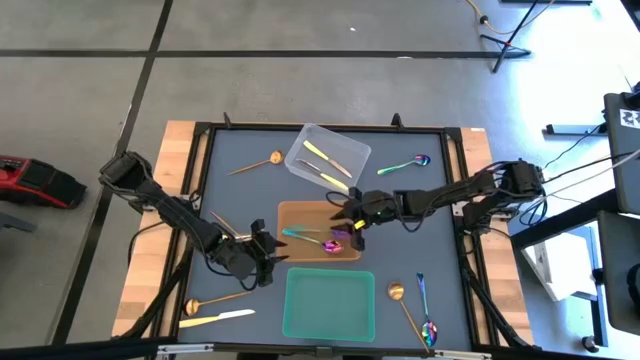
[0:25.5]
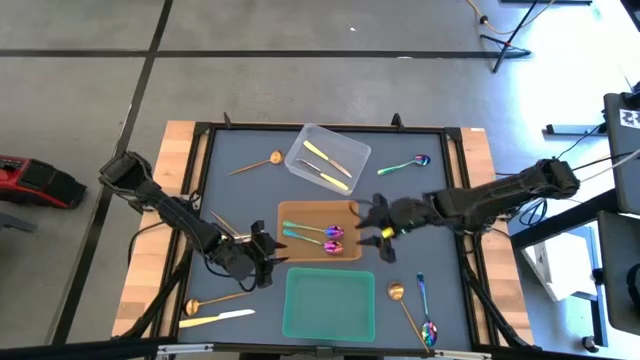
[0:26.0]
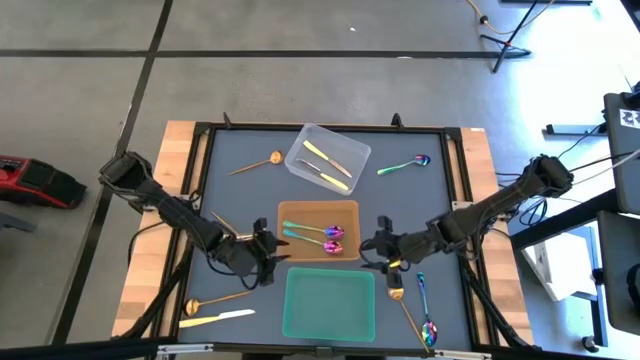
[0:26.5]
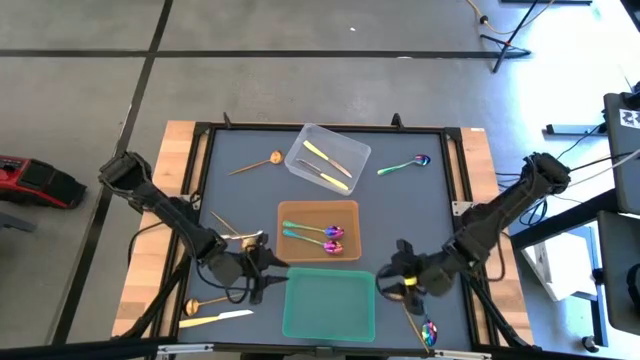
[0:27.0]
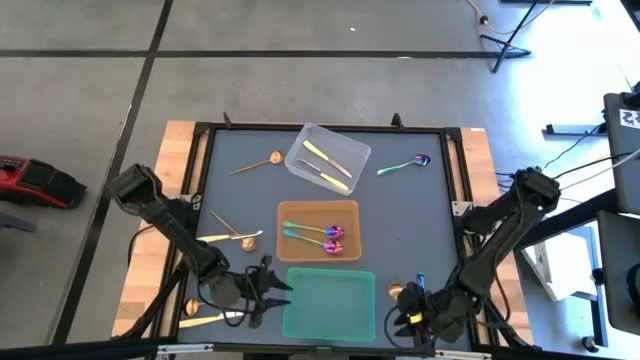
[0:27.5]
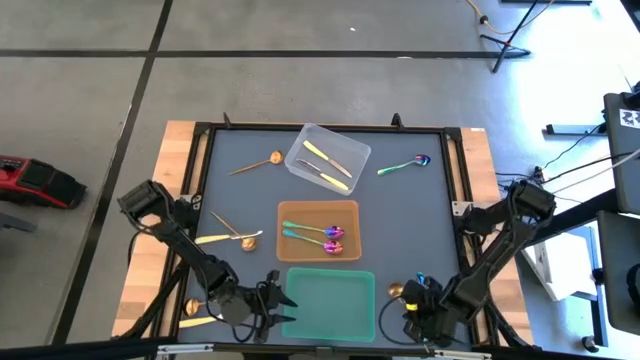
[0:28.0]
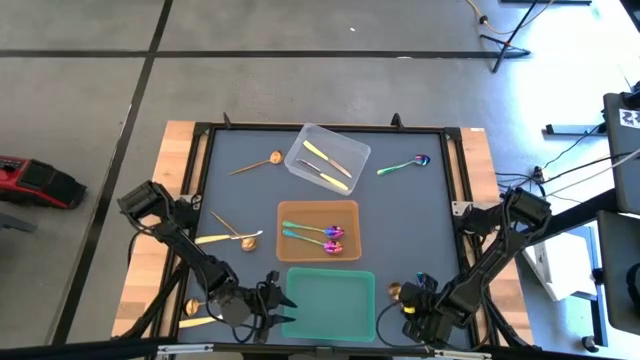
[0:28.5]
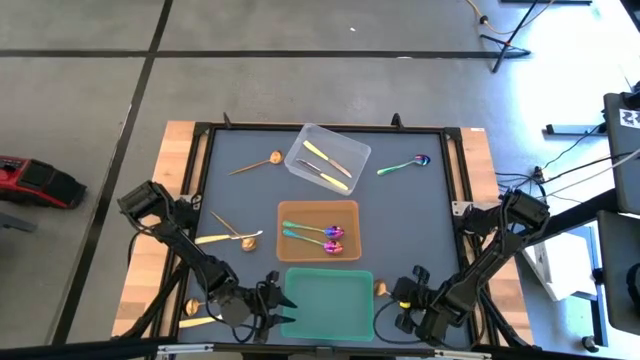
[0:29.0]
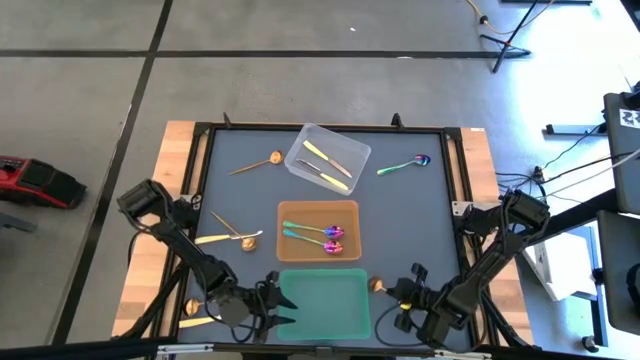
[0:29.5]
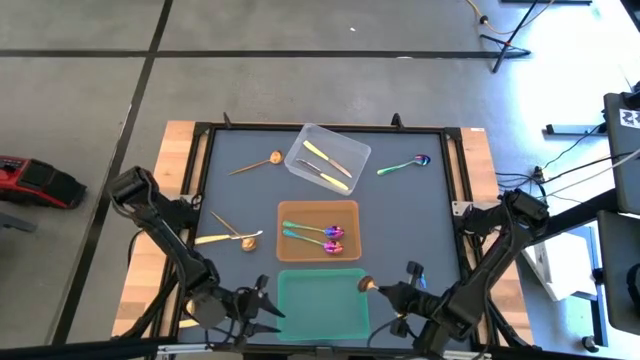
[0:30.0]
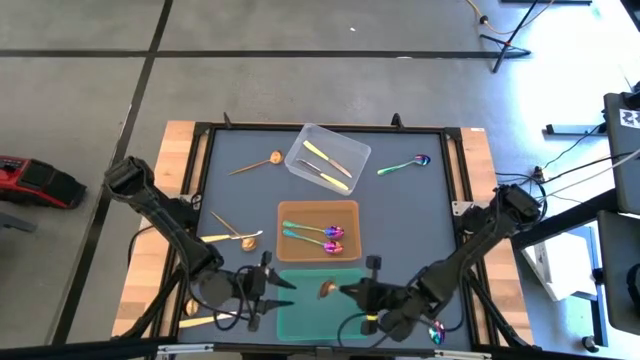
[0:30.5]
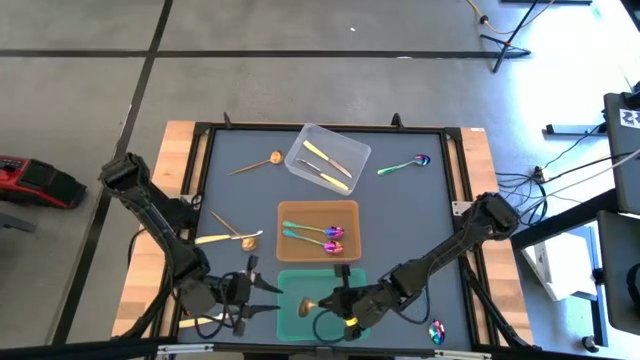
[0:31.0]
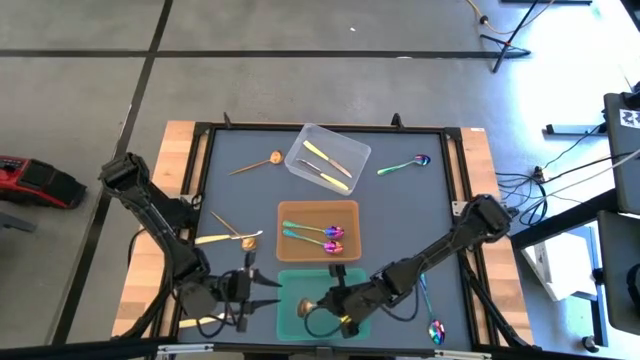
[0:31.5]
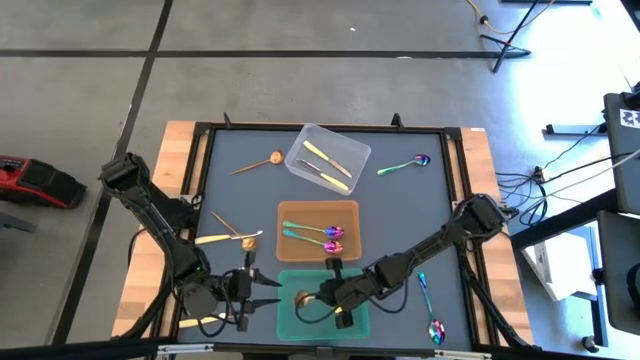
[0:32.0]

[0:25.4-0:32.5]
Task: Sort silverware by color (type)
Put the gold spoon into the green bin

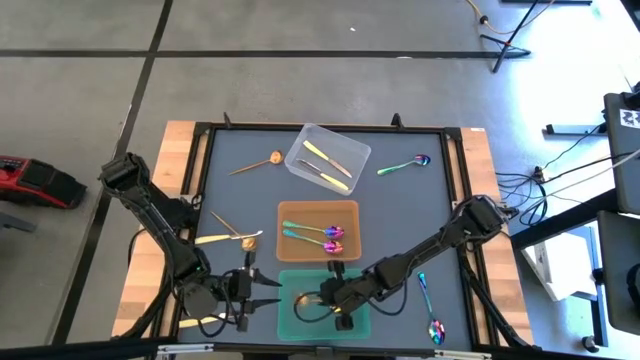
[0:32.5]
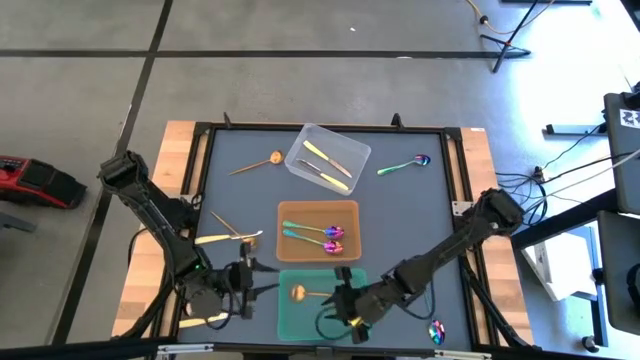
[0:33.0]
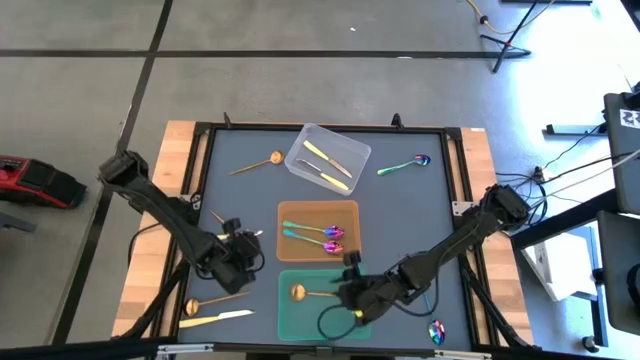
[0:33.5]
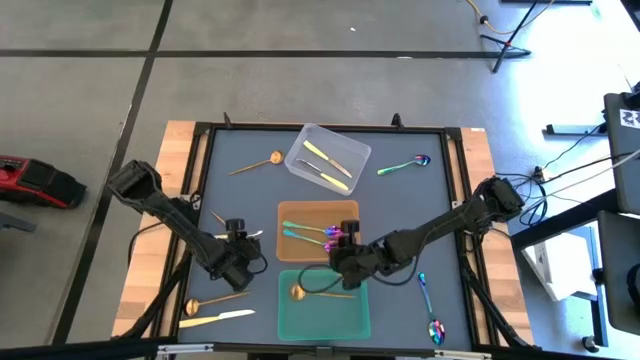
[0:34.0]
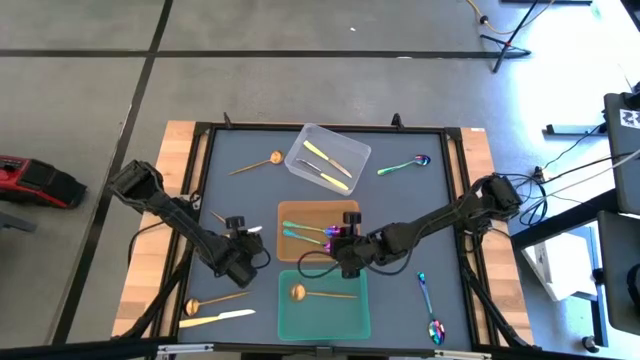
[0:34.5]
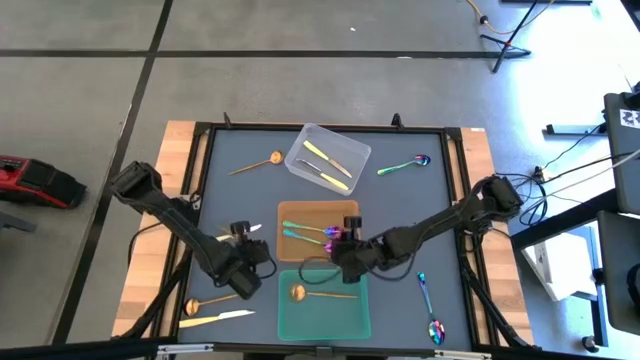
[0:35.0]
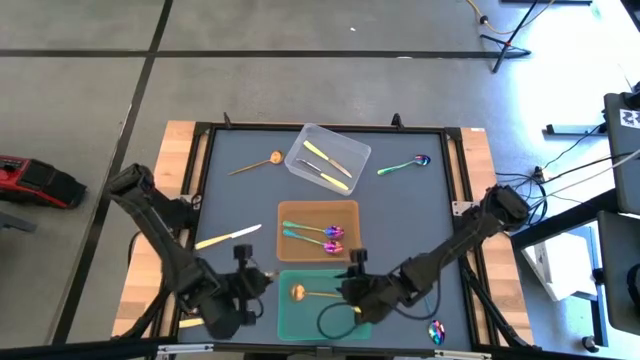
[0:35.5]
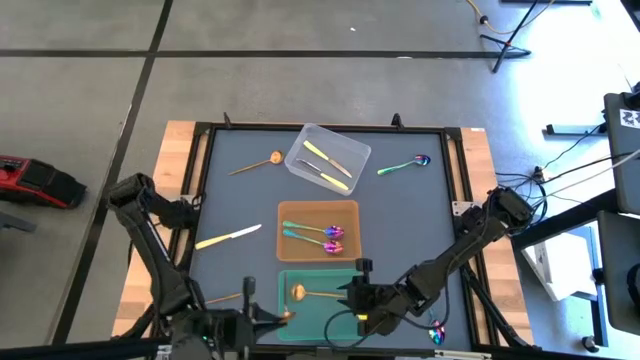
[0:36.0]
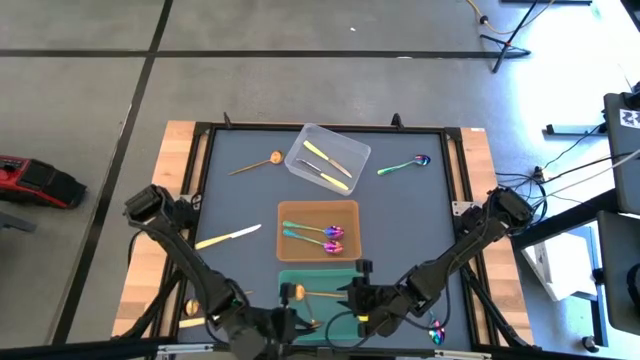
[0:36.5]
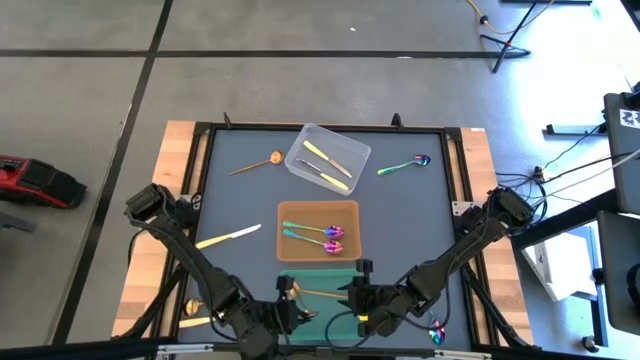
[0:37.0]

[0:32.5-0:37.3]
Put the gold spoon into the green bin

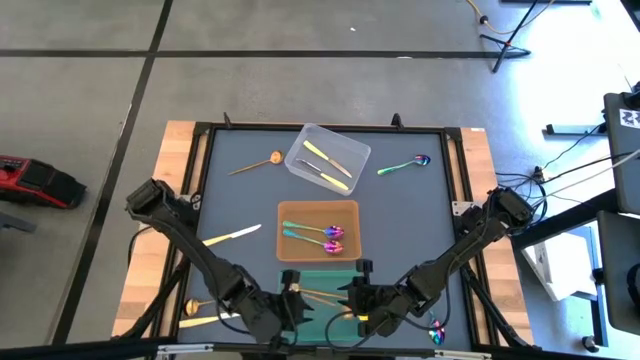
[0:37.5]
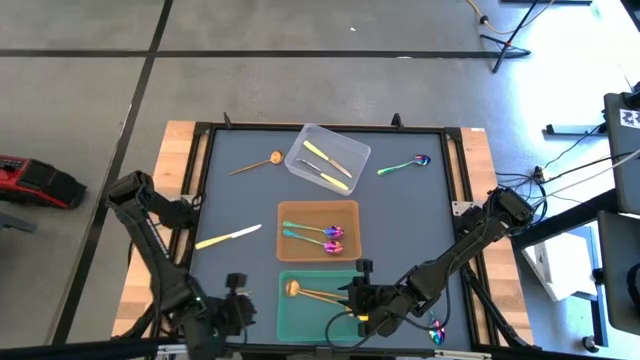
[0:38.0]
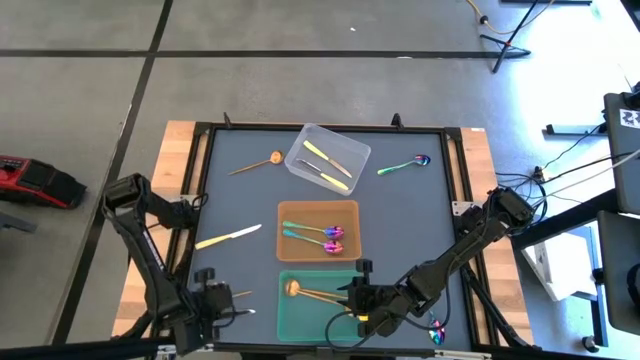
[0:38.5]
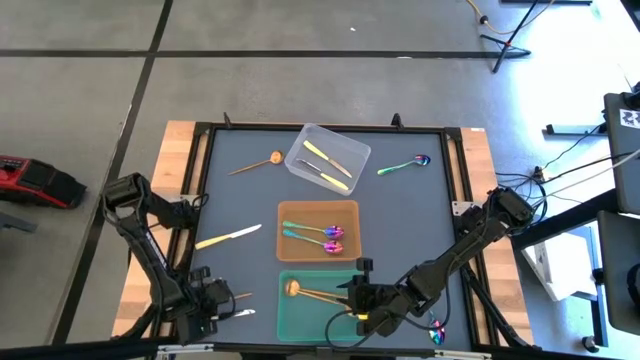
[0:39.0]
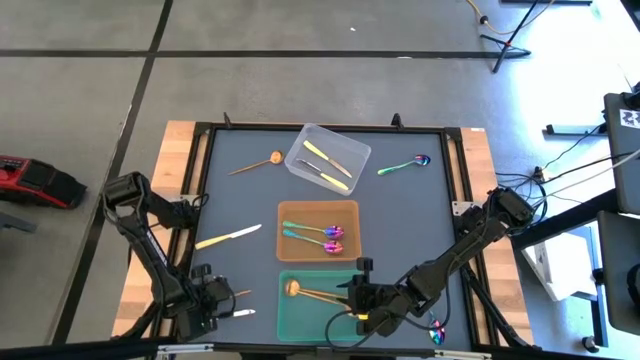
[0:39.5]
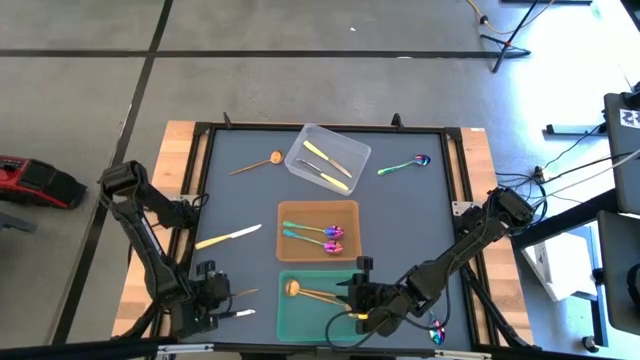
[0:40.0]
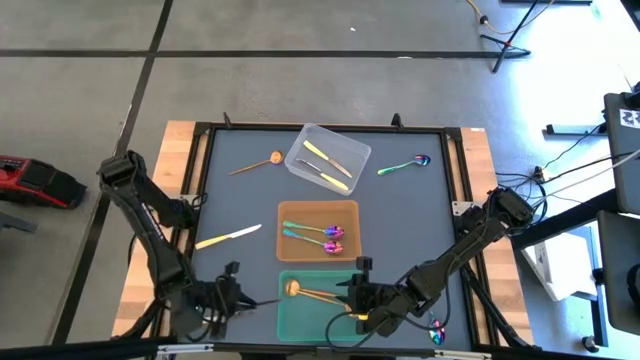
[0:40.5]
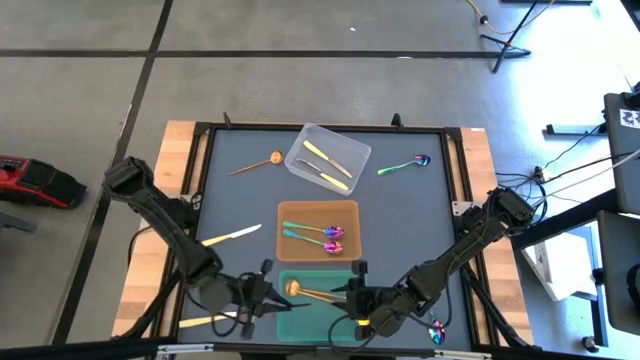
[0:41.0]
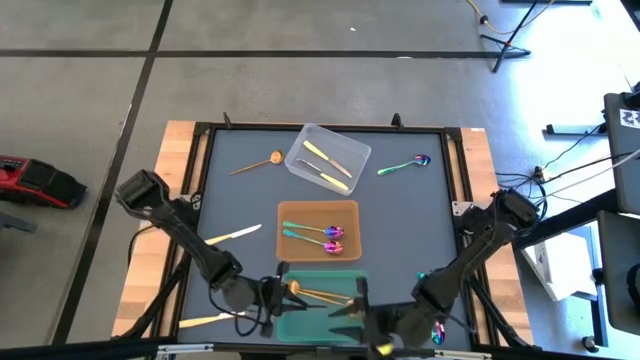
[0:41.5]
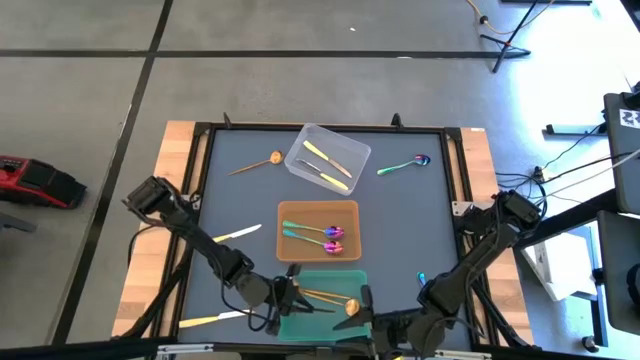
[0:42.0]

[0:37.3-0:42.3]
Put the gold spoon into the green bin

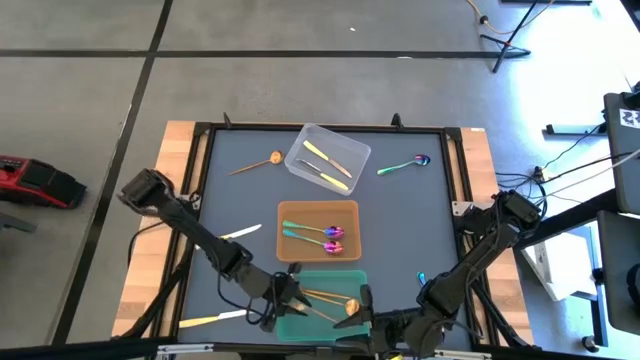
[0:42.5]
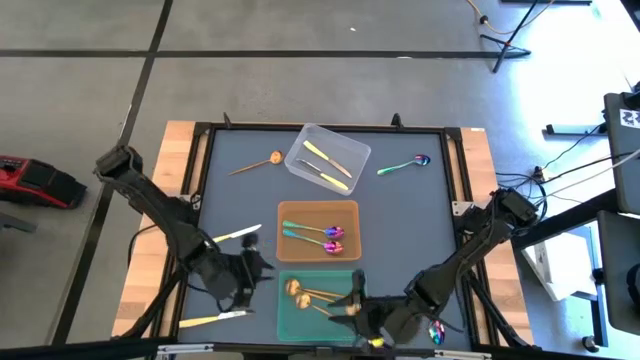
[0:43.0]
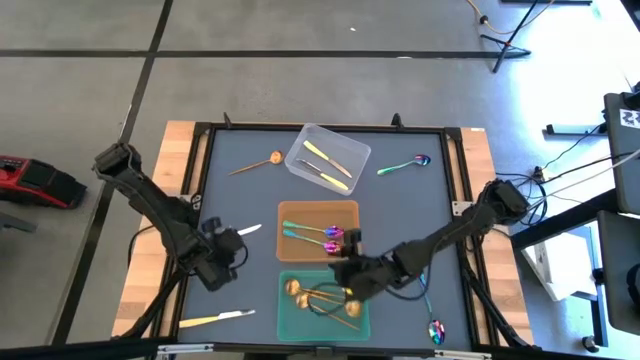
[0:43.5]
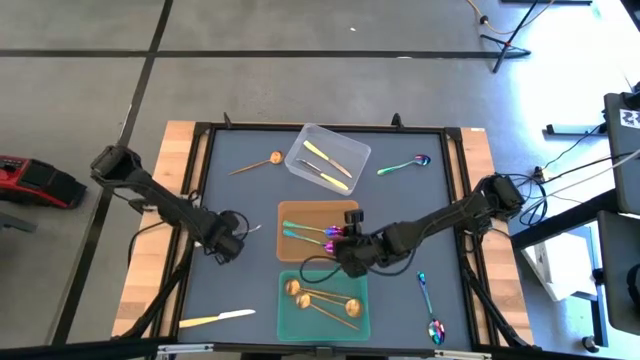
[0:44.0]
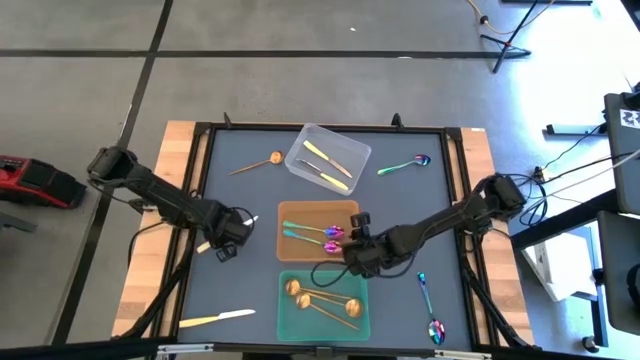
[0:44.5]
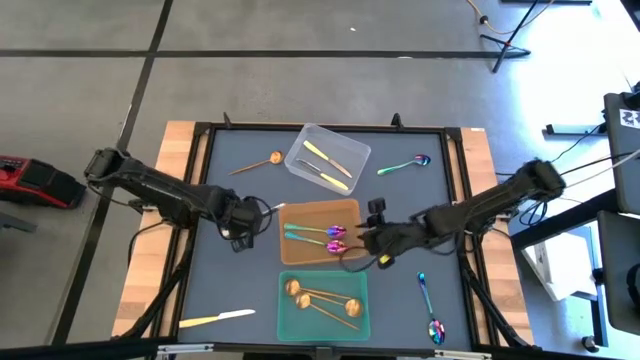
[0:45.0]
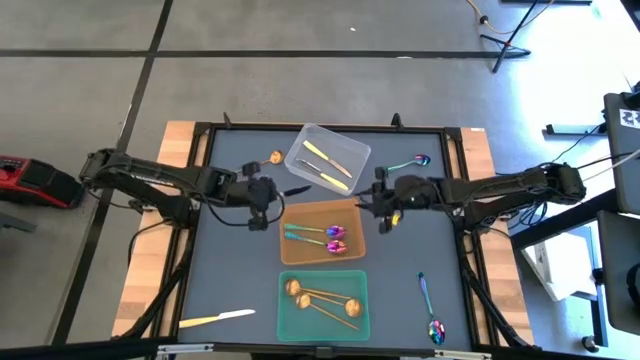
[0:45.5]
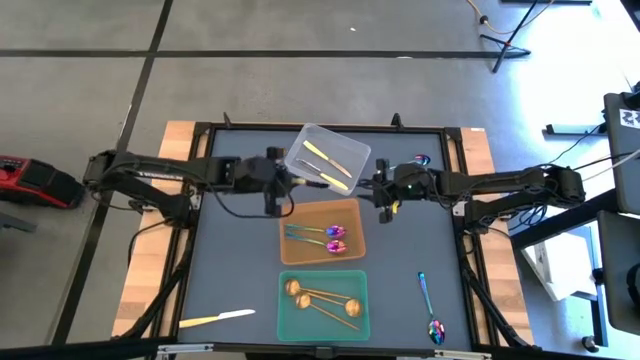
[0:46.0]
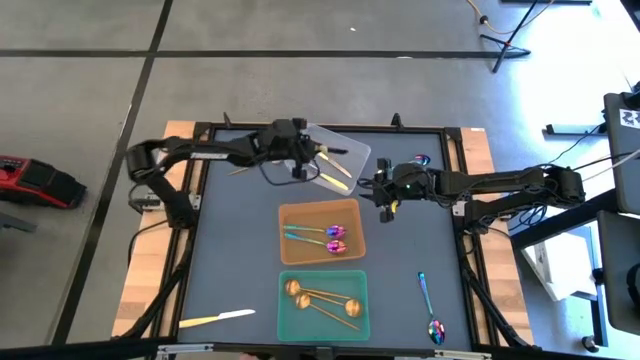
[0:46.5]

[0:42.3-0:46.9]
Put the yellow knife into the transparent bin
